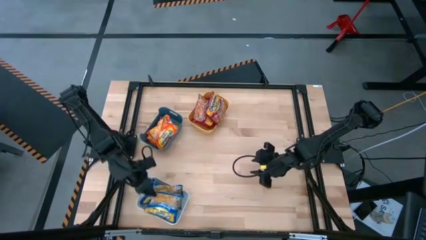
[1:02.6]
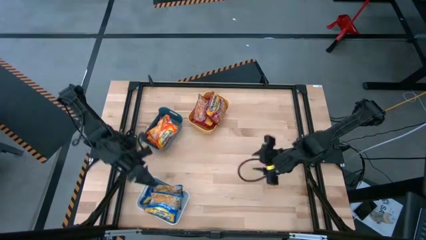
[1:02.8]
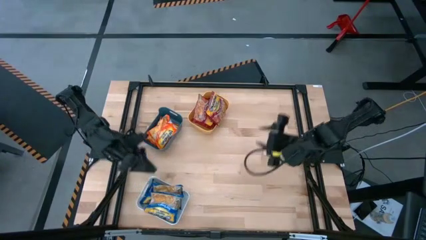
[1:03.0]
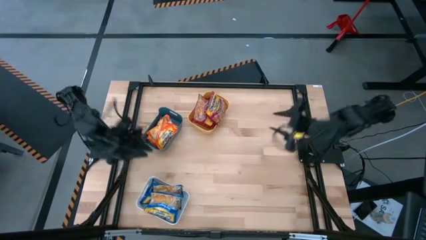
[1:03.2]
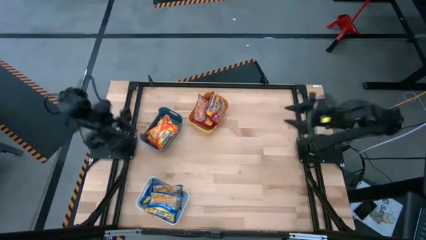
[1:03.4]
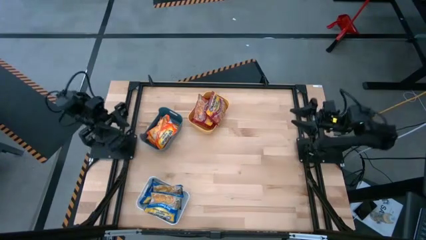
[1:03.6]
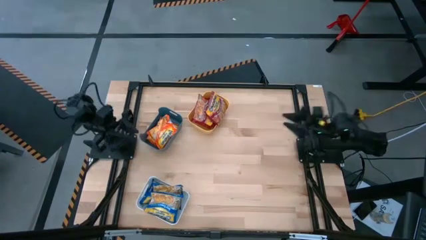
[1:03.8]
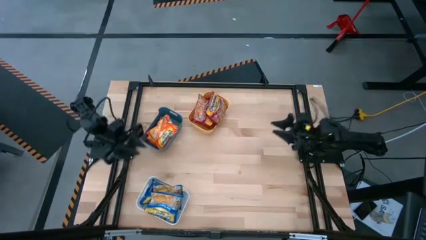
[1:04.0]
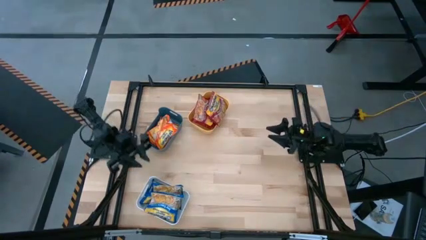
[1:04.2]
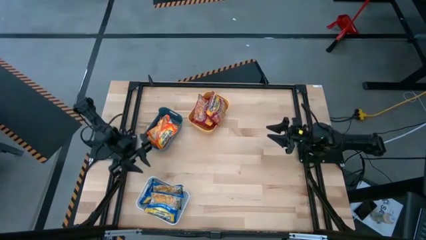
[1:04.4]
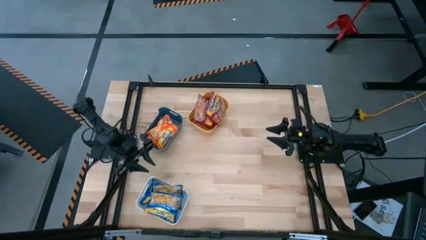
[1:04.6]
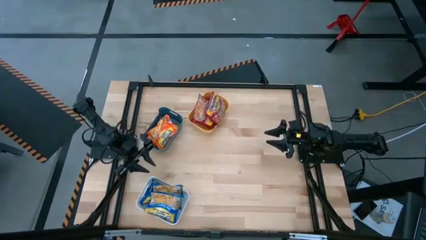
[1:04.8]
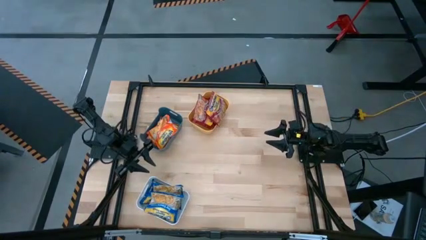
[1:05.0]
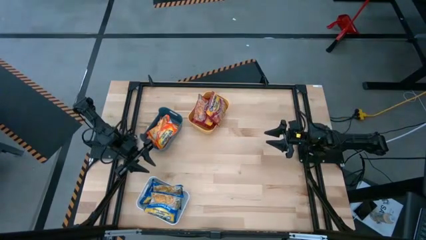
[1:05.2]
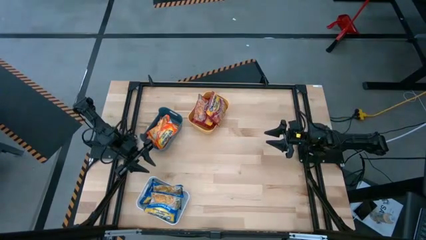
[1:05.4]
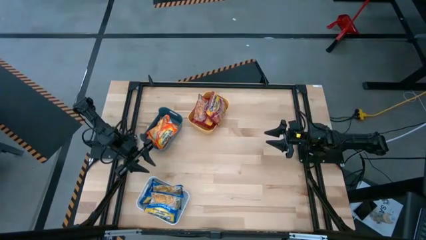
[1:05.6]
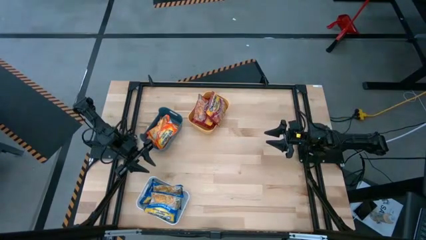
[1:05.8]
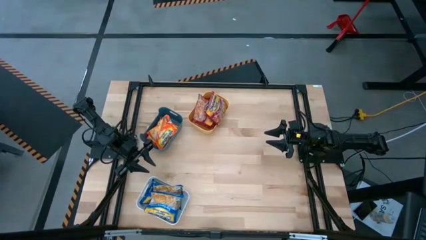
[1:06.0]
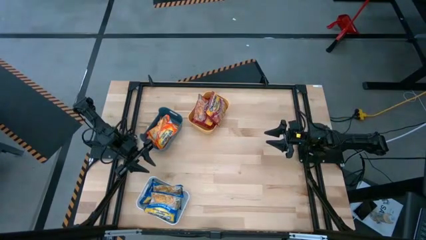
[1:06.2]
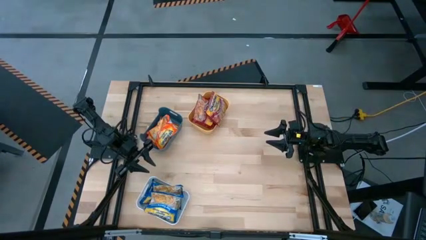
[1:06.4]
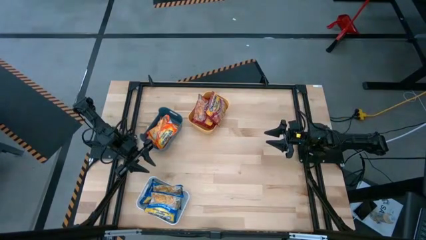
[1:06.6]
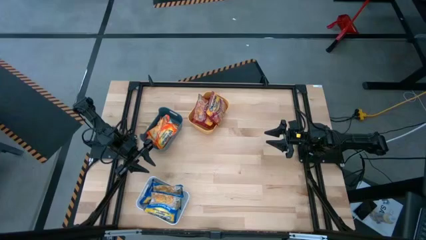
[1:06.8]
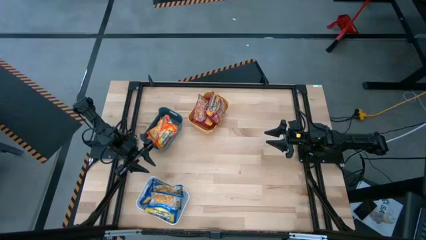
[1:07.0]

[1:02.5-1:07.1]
Task: Sort Maruchan noodles
Return to Home Position

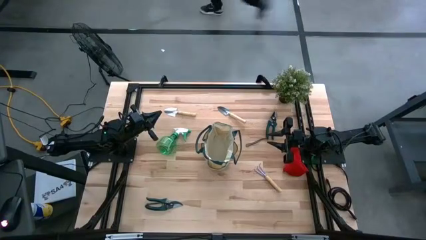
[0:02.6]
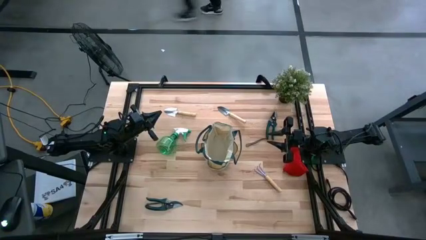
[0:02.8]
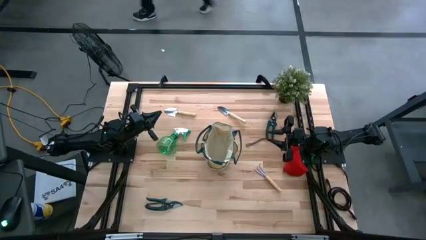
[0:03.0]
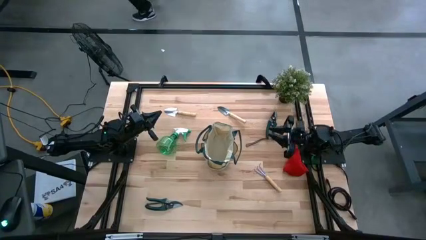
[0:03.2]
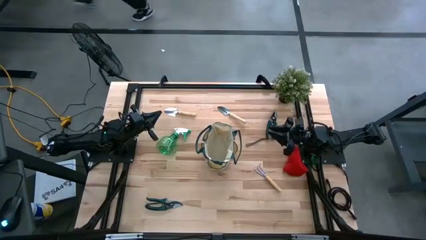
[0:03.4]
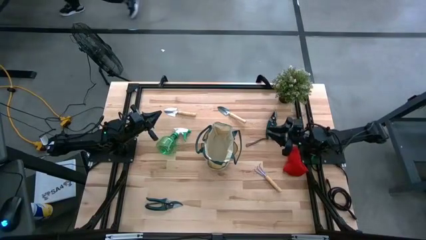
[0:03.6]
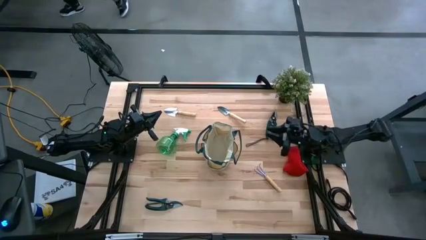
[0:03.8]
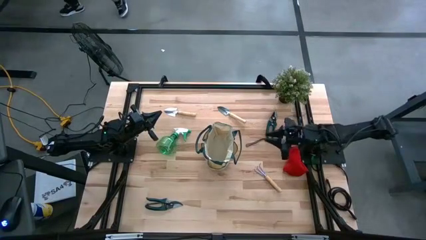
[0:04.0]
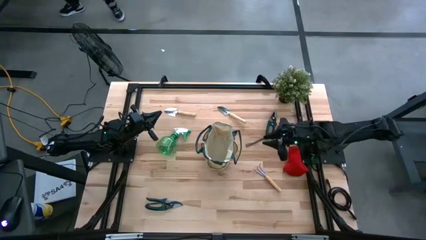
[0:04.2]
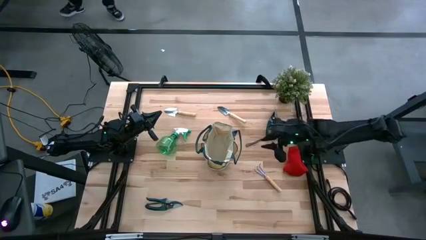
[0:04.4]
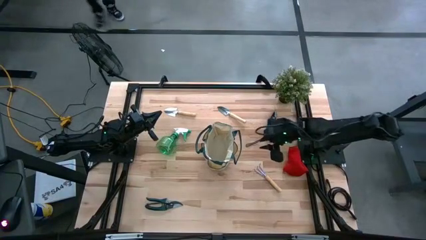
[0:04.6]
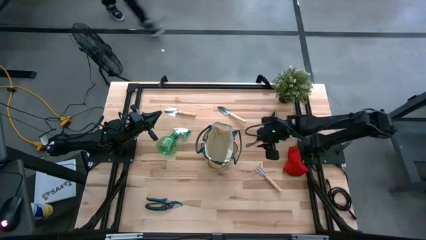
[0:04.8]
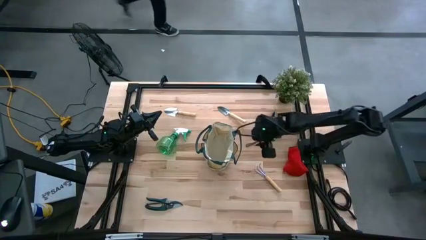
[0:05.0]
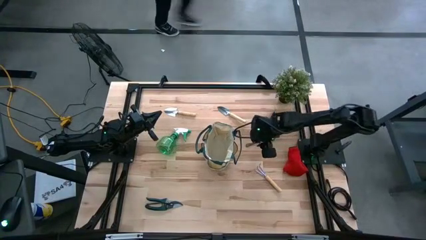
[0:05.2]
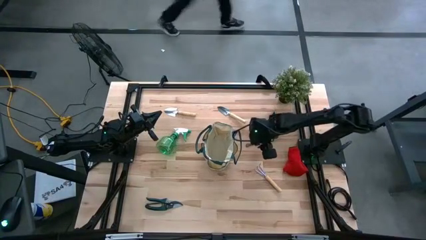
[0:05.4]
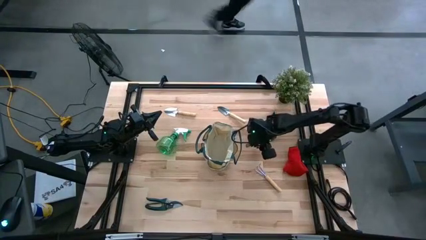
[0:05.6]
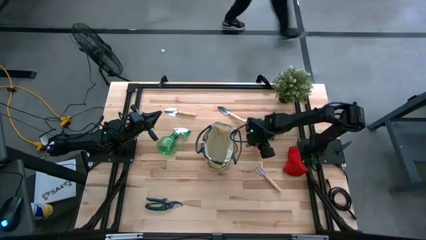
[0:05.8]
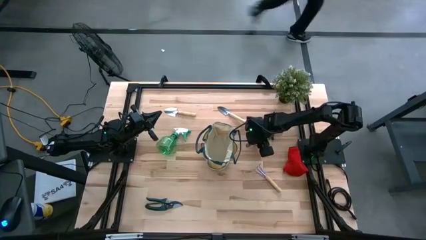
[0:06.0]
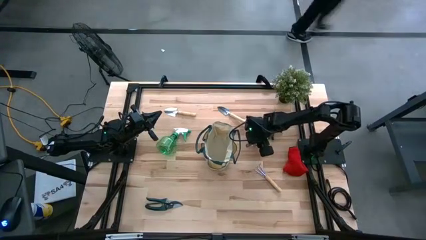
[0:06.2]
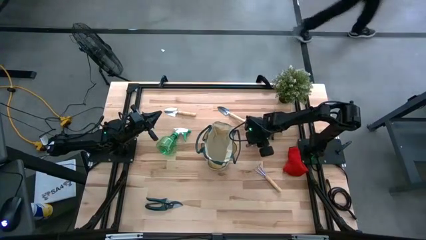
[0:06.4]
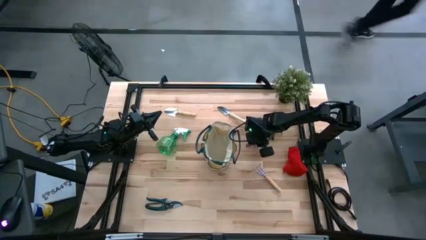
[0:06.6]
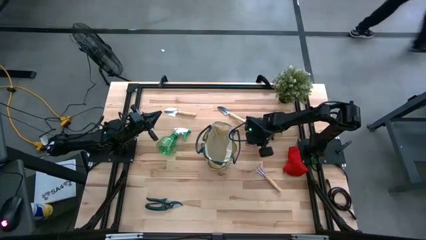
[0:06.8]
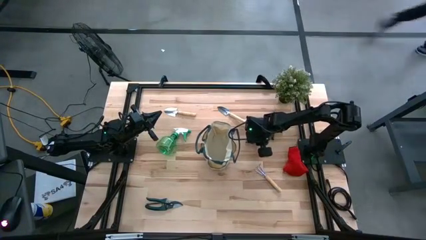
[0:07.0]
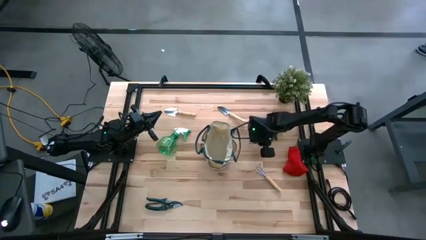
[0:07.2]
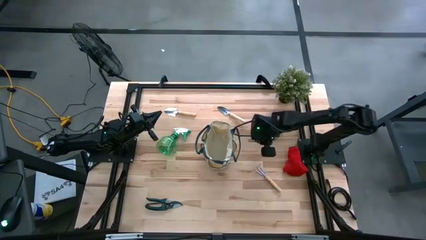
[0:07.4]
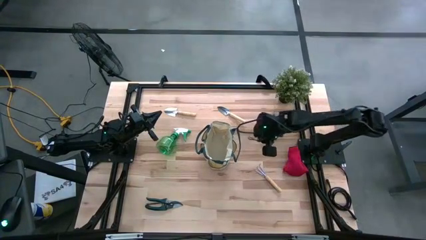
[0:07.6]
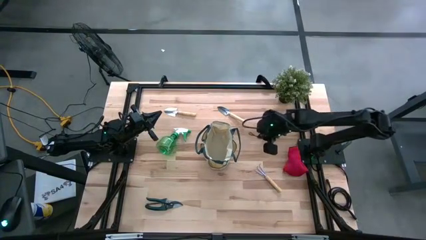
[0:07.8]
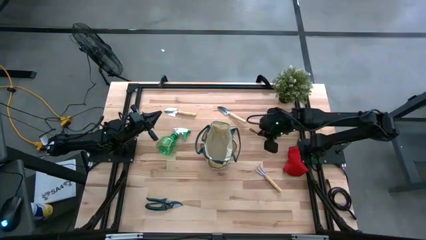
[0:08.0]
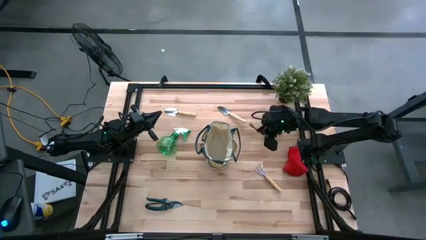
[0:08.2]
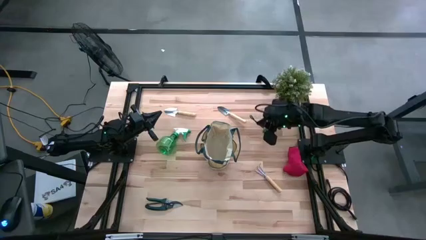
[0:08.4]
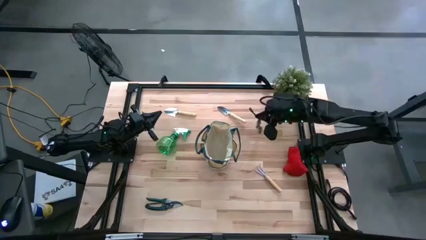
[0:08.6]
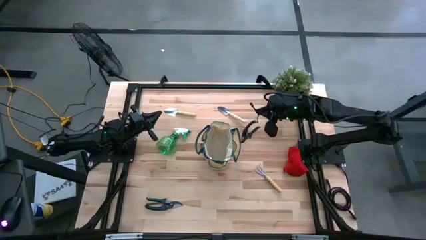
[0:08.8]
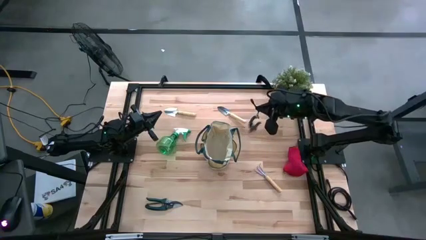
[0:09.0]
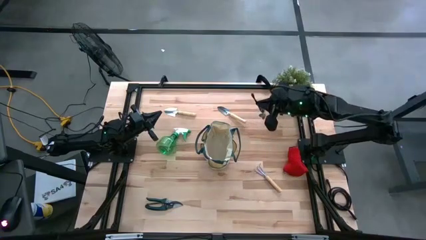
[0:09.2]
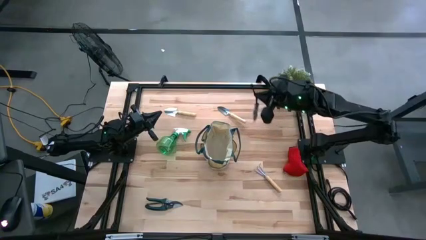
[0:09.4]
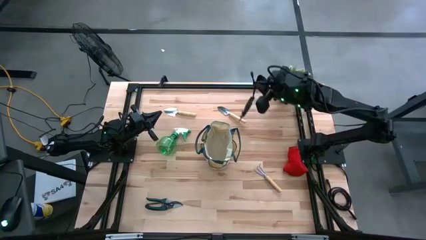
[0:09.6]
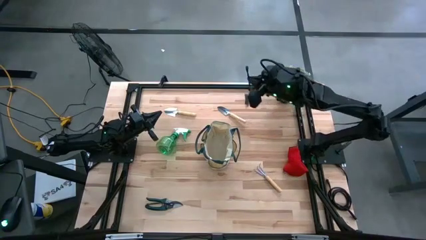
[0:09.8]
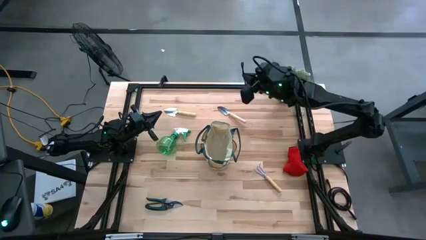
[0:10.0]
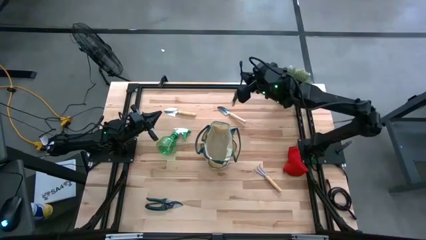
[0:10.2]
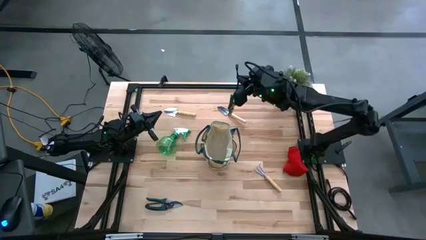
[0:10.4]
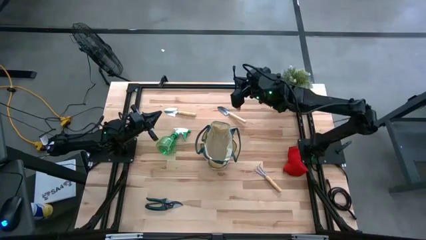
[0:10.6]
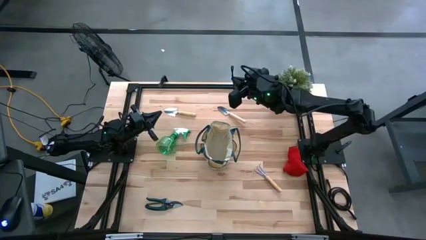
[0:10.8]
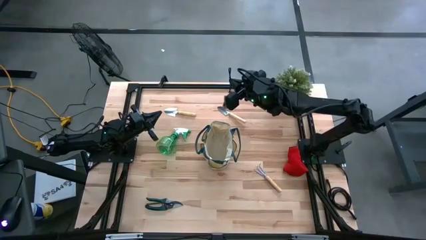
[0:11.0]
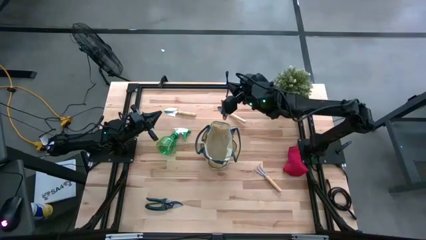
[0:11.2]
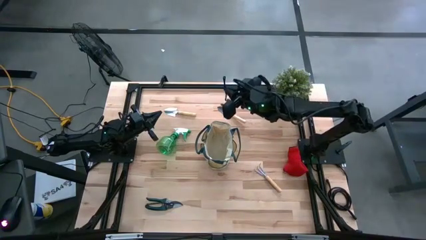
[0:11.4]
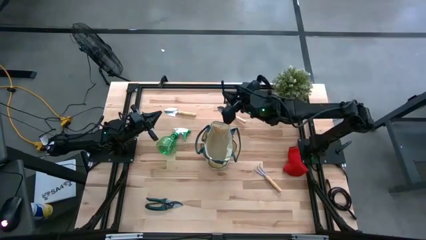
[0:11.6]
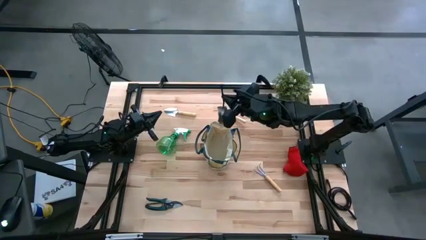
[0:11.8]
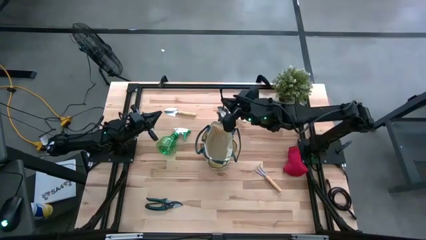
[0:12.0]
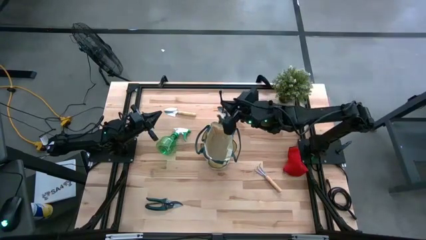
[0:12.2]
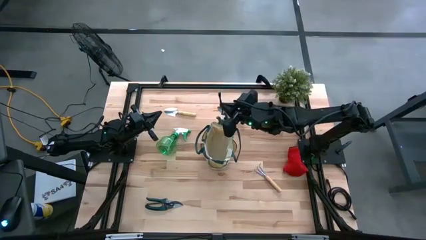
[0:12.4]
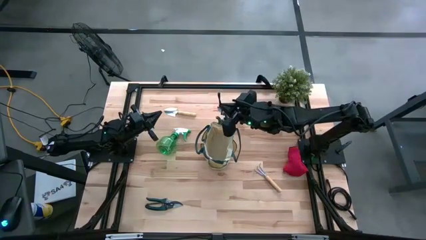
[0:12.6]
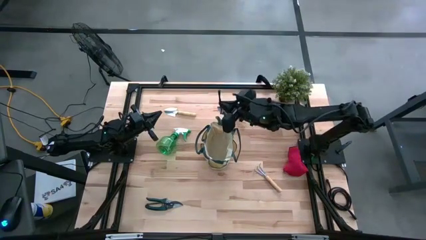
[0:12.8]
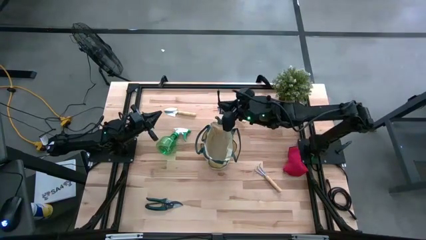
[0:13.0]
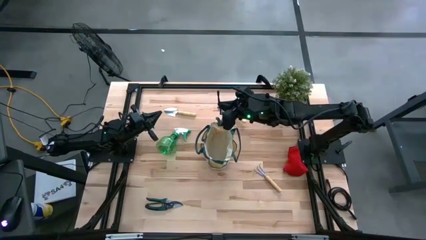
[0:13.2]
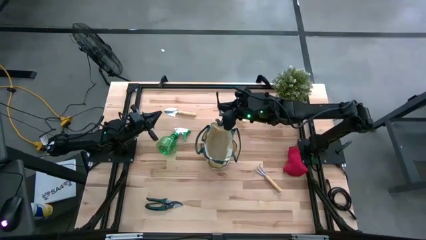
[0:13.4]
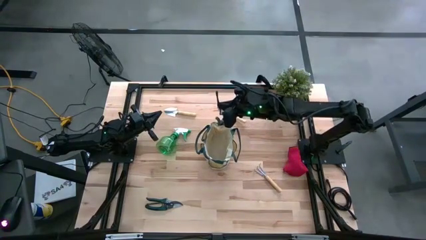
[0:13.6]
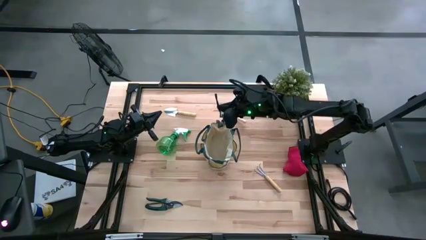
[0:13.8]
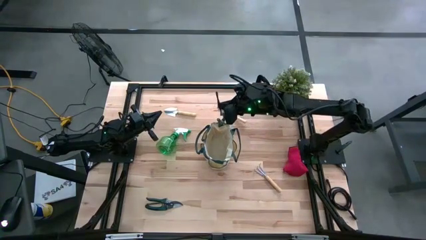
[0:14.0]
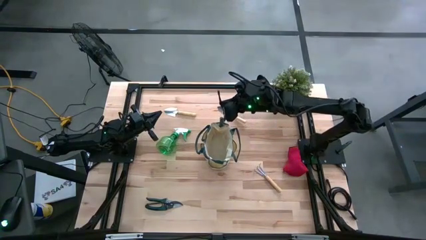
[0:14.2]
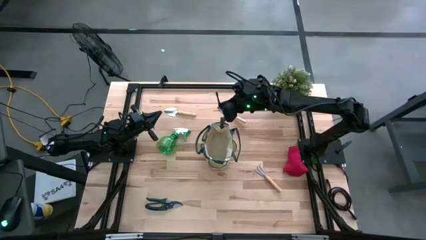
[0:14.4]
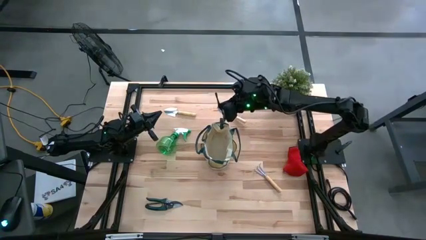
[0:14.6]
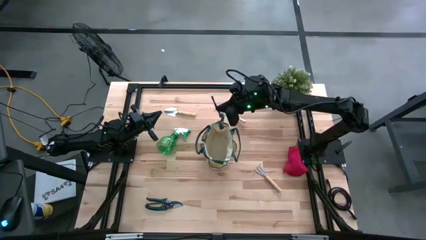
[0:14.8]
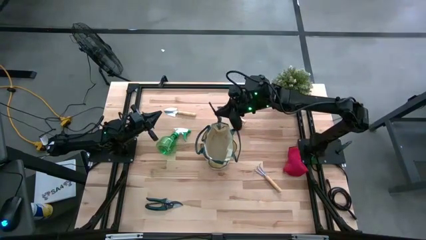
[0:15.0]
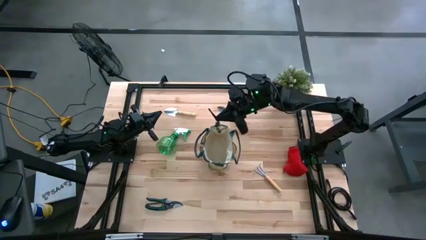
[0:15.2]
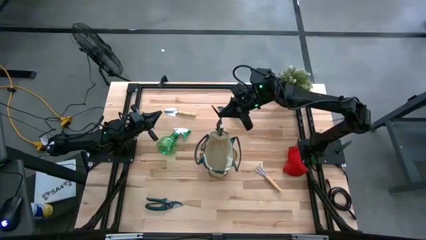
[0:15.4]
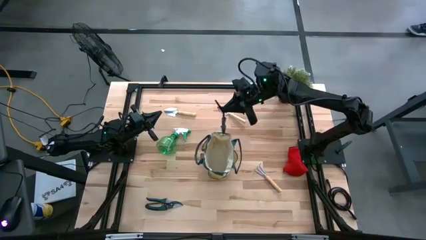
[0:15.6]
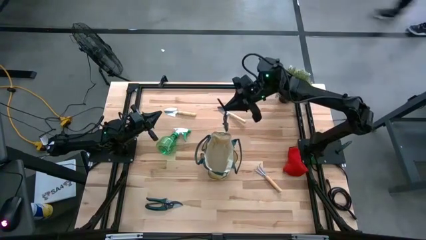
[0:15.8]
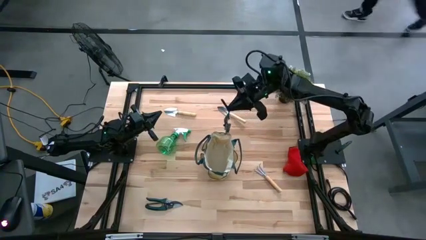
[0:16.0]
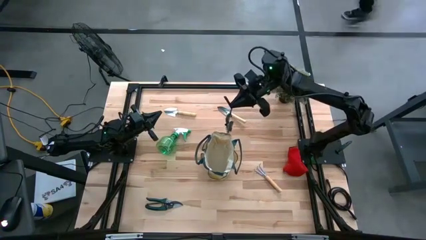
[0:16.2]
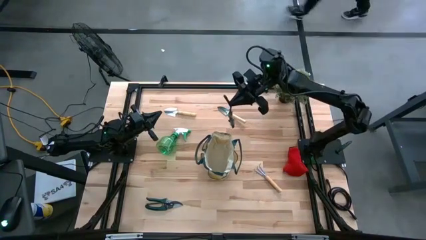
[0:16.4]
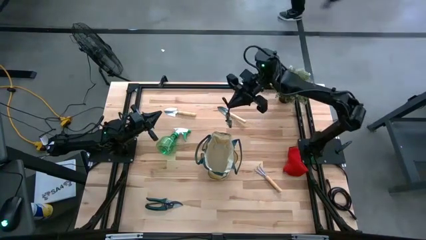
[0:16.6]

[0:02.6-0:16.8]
Task: Pick & Place Garden tools in Gardening bag
Put the green shears into the white gardening bag
